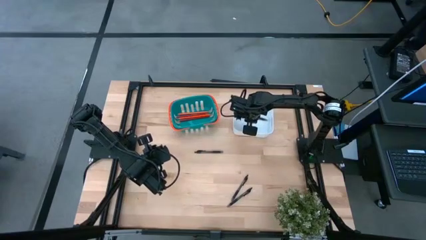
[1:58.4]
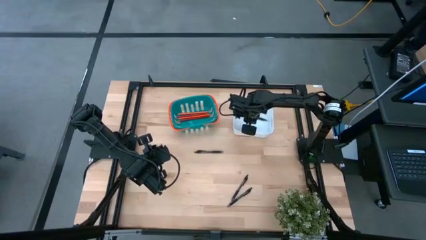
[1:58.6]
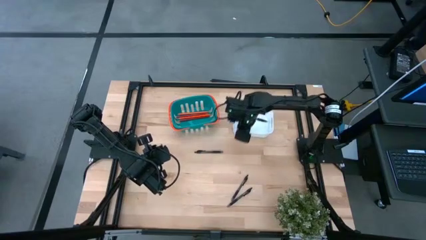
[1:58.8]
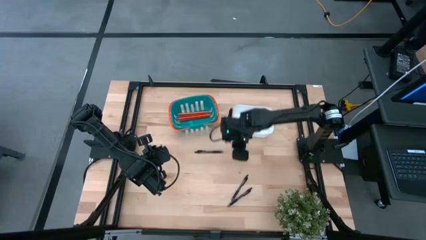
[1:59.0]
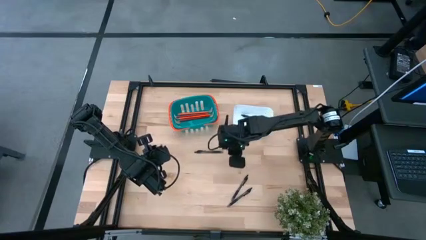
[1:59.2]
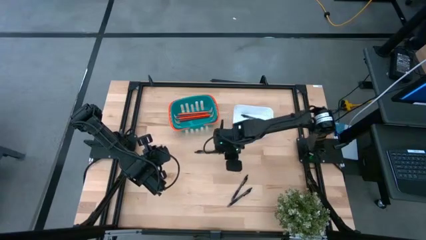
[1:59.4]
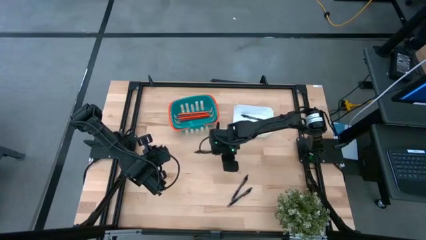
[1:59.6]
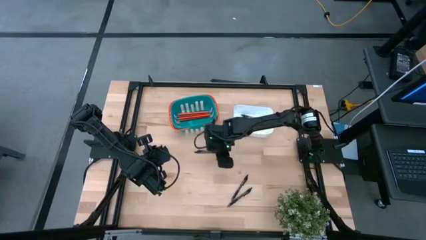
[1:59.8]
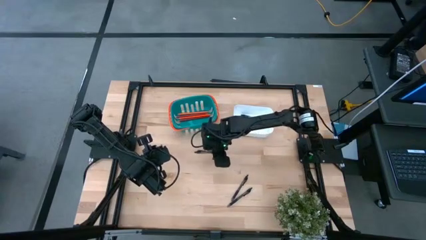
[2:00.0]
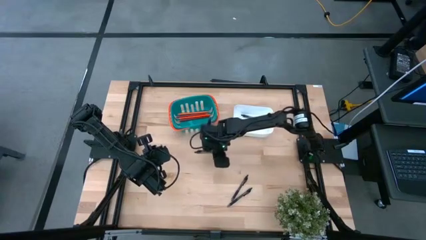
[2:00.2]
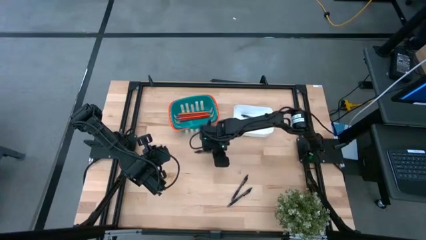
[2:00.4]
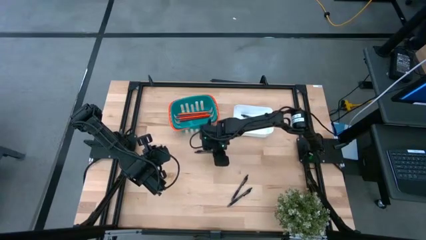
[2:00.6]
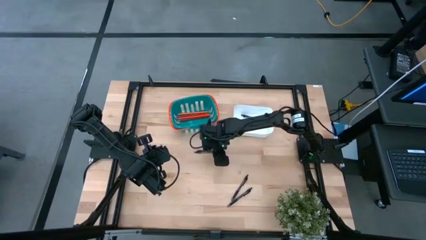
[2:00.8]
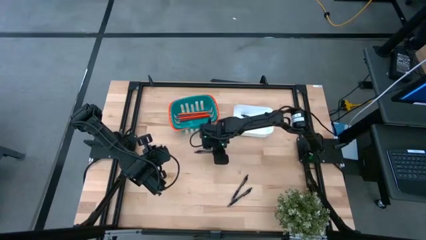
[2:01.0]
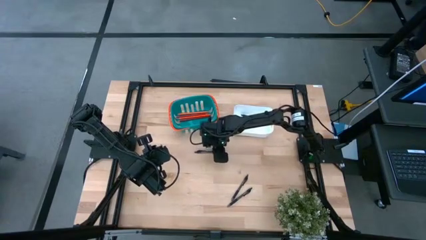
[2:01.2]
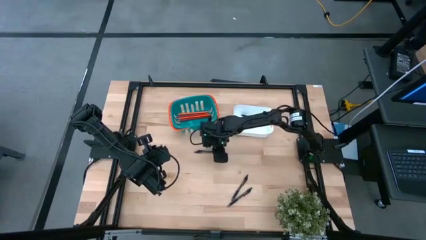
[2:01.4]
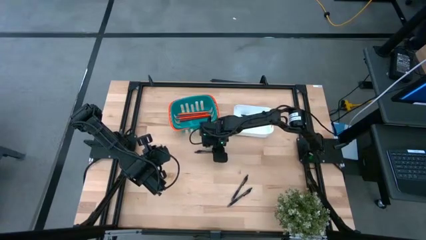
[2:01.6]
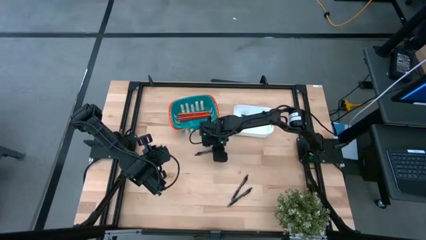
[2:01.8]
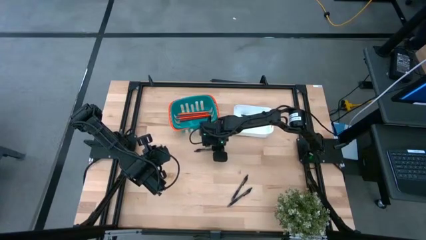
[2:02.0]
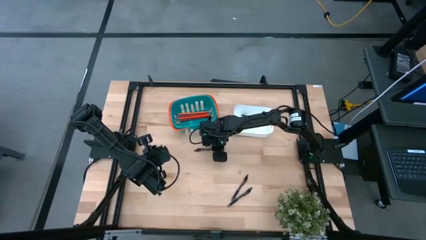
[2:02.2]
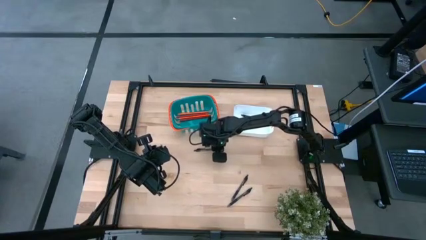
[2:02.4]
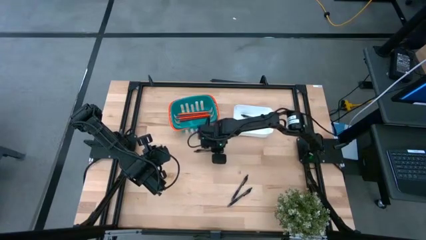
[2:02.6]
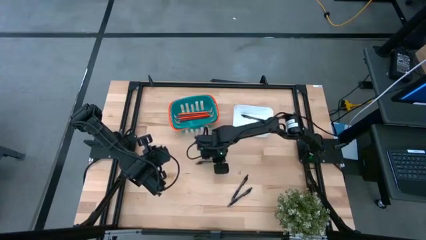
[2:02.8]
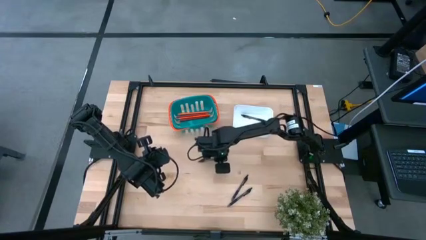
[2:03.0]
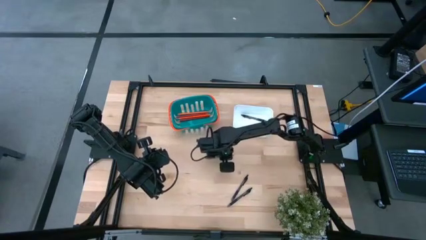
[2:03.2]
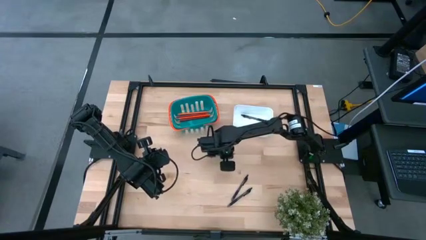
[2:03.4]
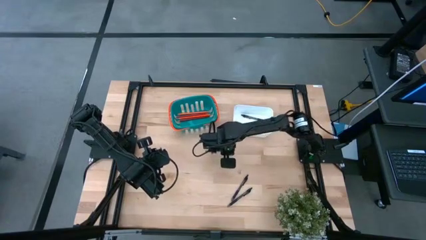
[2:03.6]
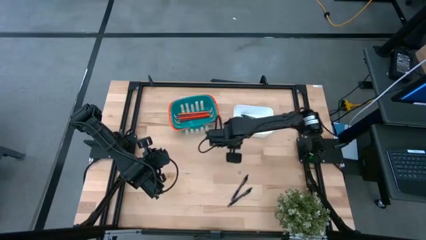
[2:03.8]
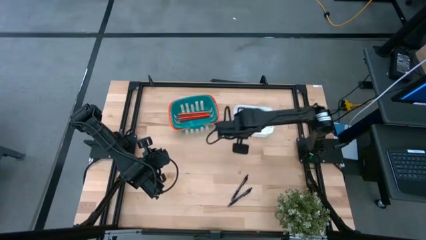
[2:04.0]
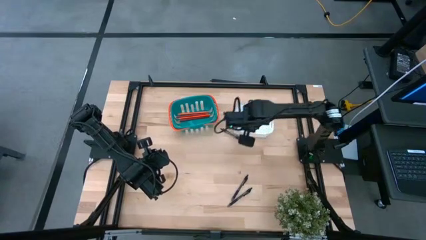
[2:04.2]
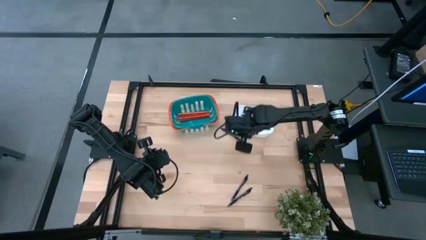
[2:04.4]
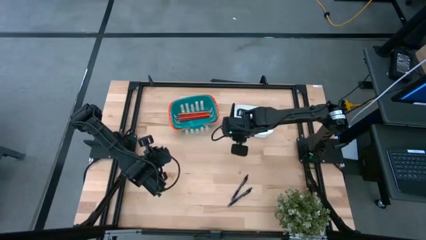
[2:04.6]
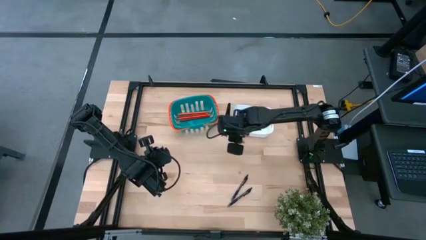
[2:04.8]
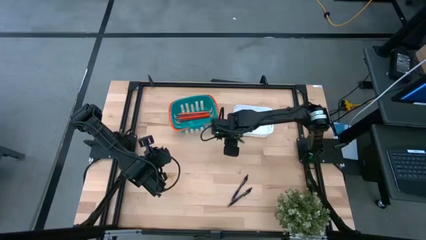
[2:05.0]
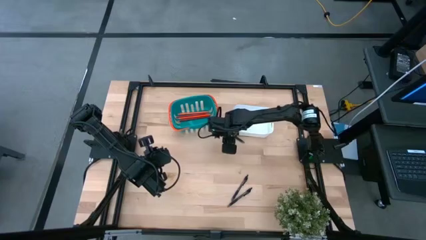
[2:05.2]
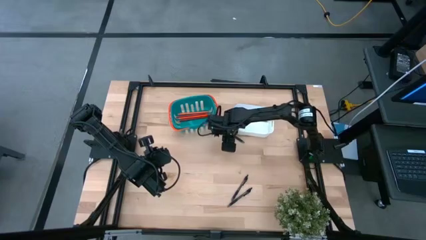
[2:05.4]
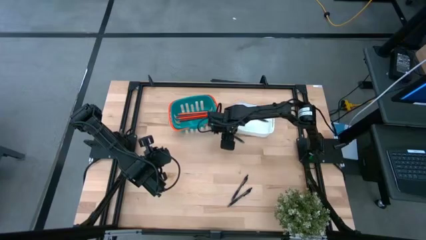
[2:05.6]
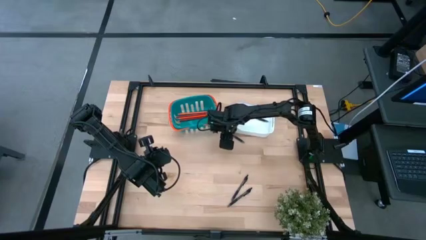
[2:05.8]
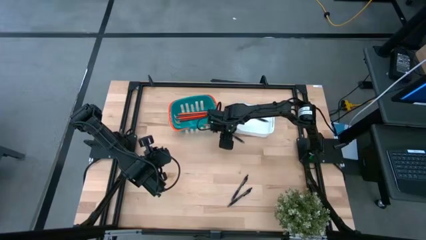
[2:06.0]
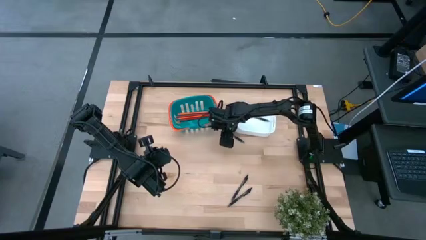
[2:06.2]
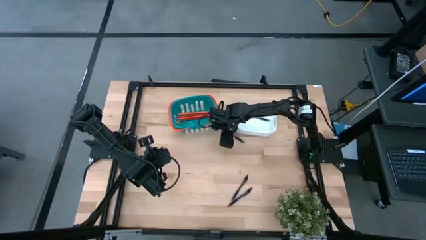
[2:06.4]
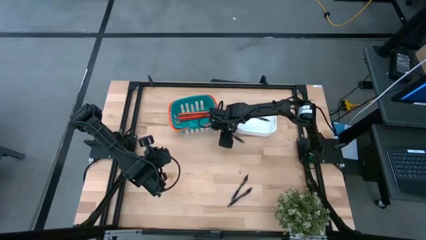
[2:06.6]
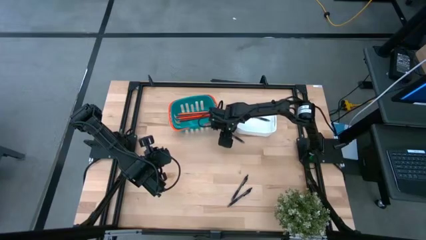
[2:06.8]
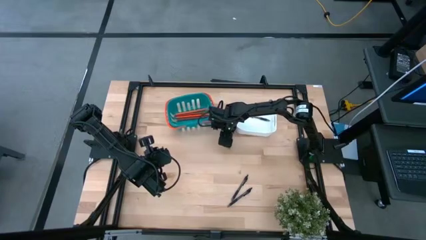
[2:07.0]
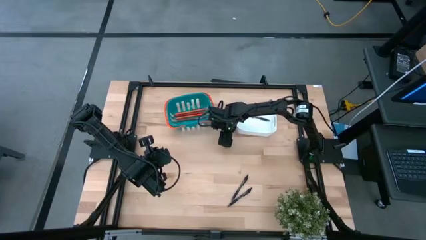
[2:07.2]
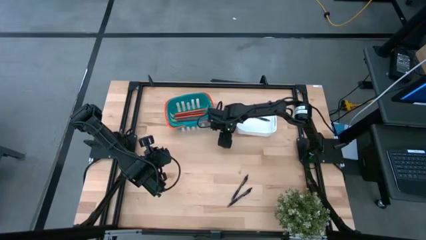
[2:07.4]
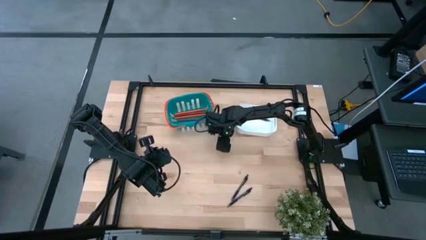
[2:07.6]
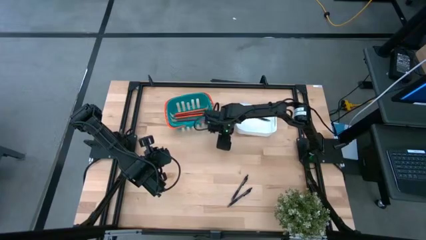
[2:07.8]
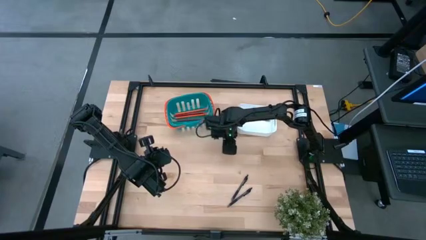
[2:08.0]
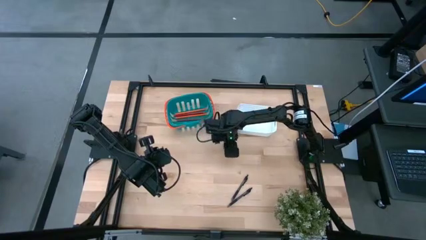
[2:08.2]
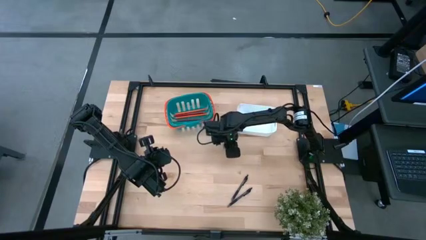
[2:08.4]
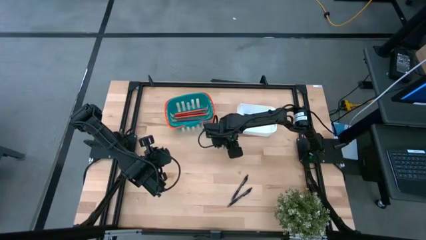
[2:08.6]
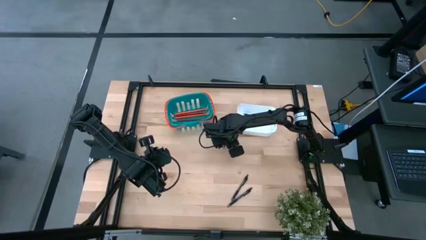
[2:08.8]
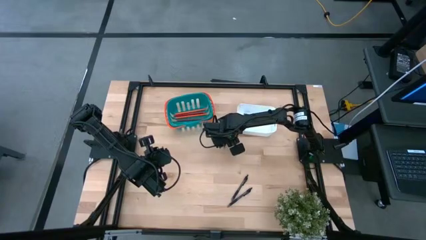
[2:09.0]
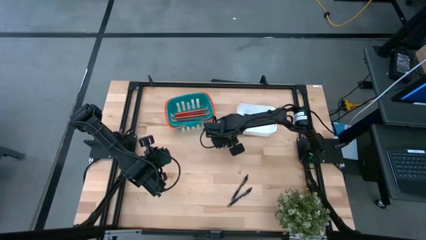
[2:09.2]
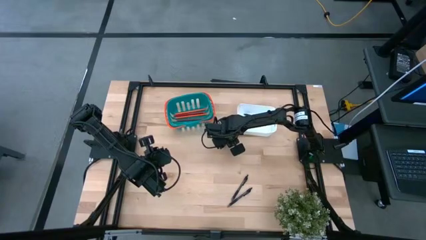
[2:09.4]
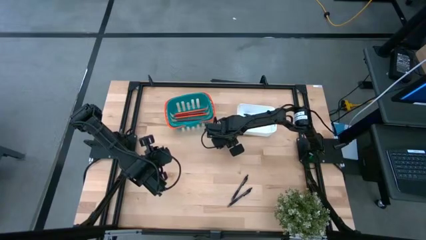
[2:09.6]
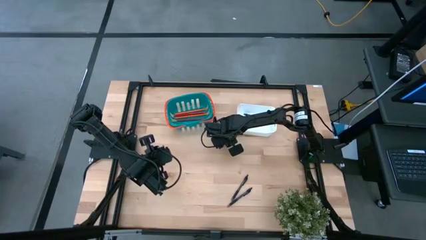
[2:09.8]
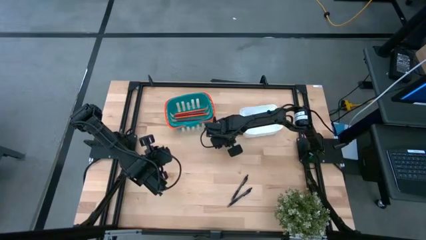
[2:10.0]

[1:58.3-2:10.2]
Task: Sort pens & pencils
Put the black pen into the white bin

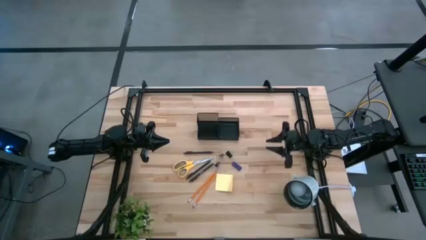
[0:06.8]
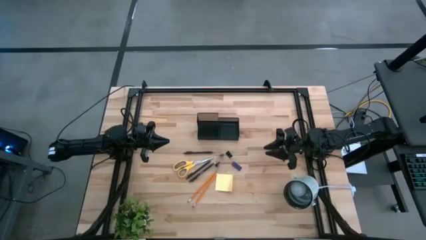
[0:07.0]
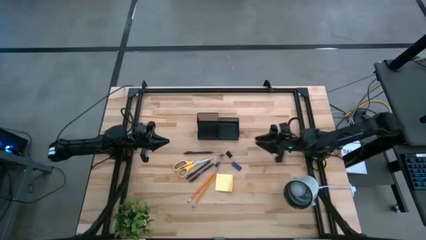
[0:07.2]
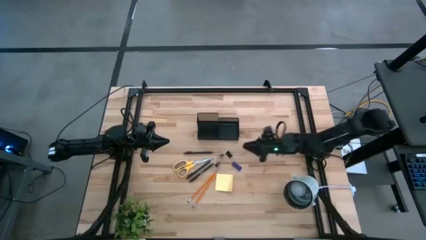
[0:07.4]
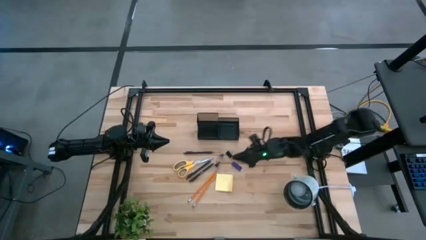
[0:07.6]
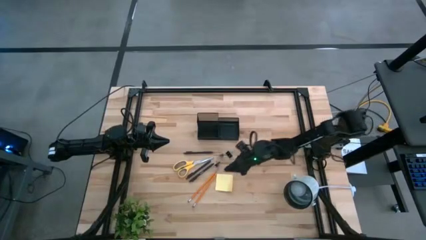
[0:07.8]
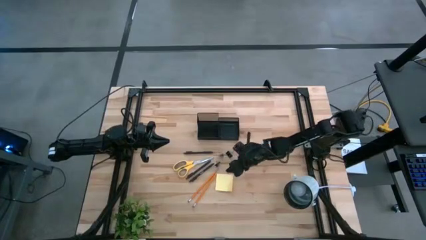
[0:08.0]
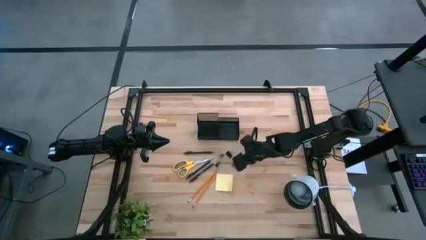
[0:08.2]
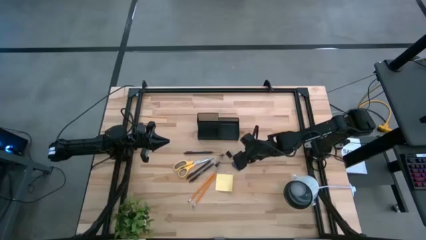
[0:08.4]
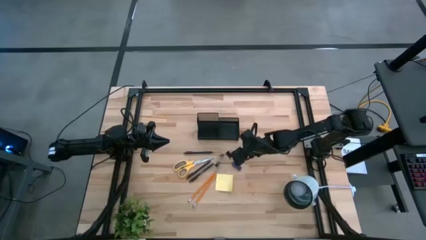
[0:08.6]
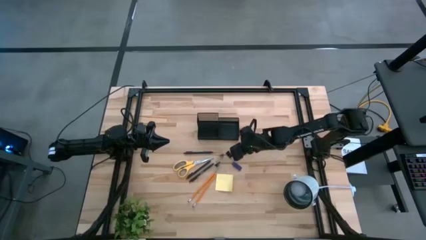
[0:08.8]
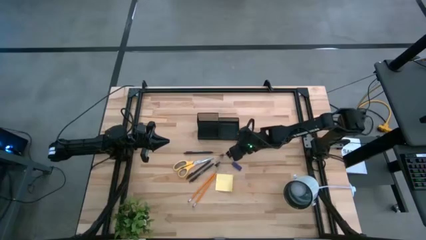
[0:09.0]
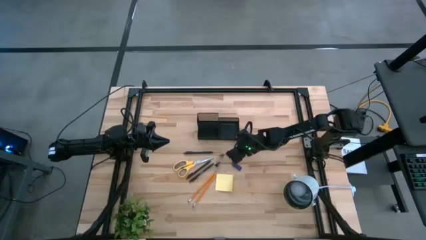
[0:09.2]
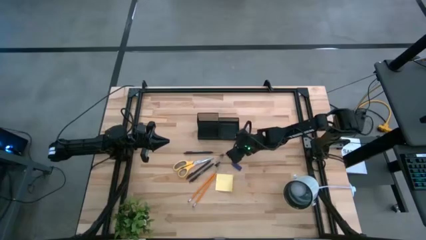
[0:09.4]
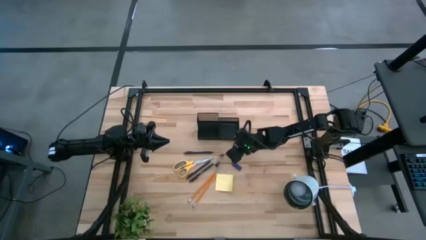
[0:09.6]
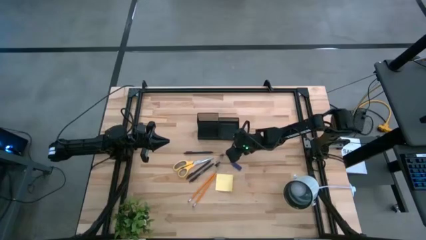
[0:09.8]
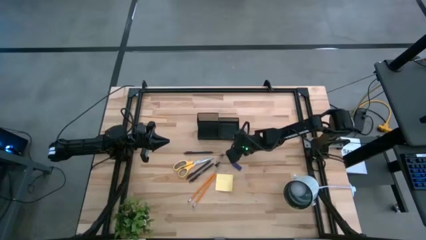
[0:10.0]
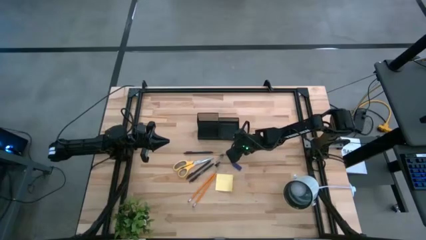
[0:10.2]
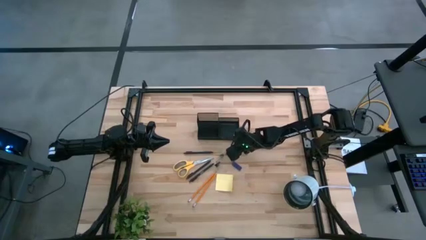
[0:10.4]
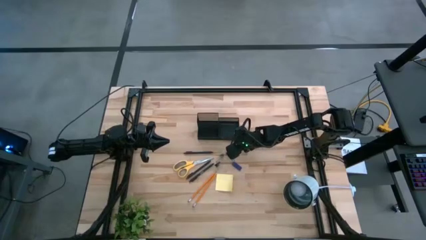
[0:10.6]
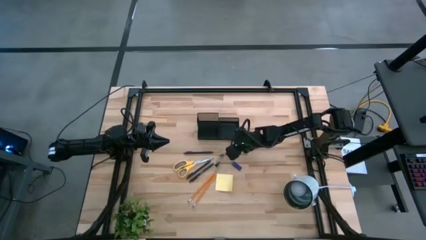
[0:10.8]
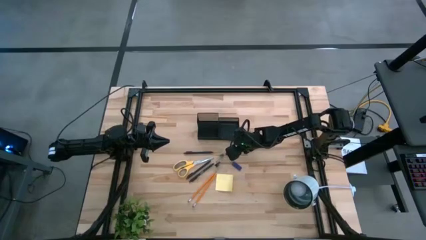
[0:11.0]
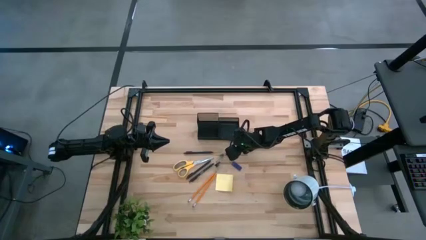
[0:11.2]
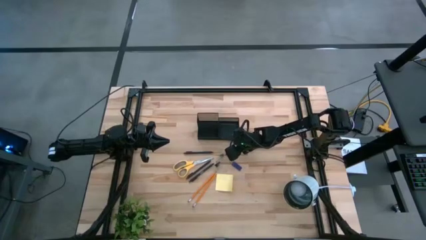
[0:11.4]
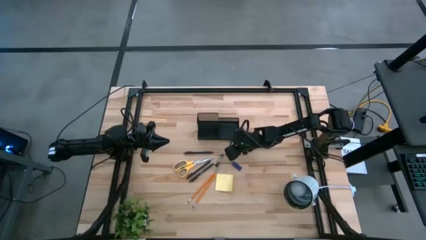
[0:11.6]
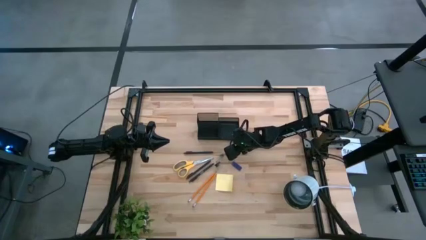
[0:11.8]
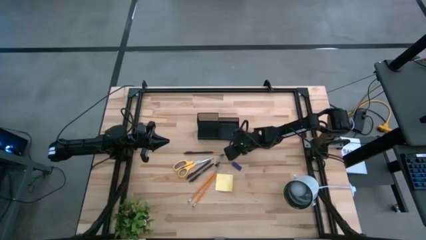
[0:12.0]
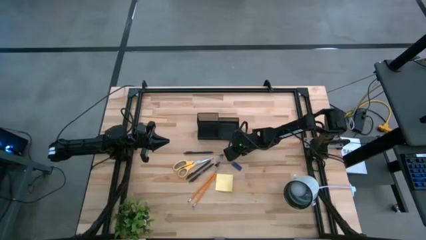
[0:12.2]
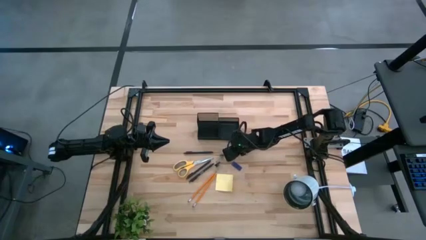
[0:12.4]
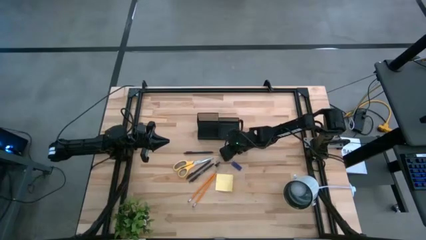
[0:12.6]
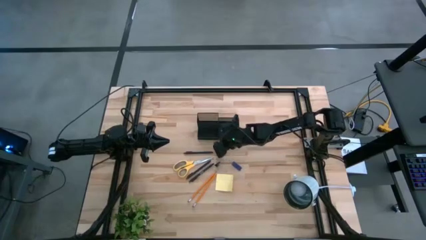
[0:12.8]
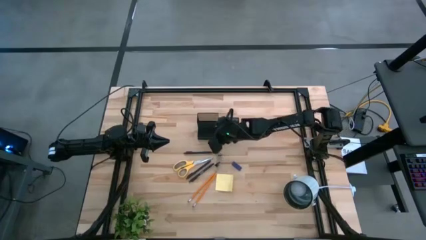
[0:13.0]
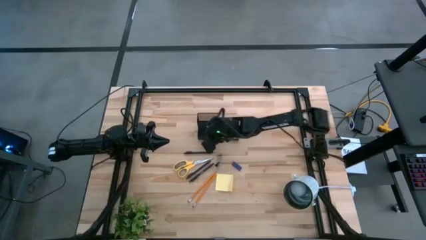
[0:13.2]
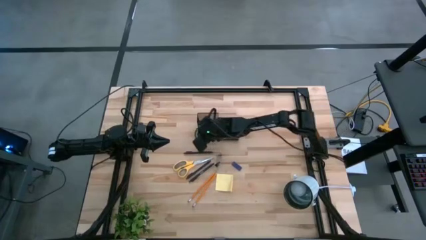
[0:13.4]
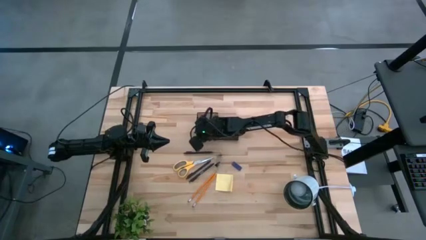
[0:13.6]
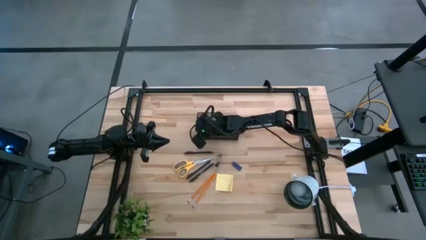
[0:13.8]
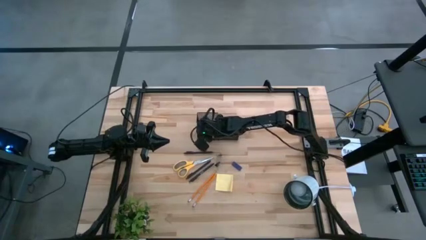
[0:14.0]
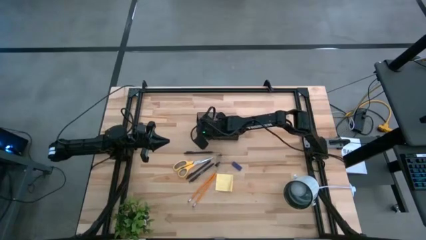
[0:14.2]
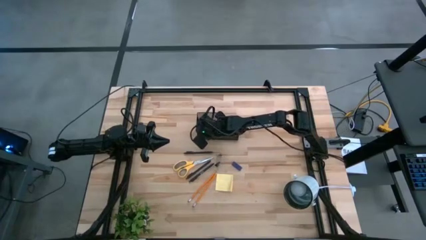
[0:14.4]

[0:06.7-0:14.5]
Task: Pick and place office supplies into organizer
Put the top right black binder clip into the black organizer bin
